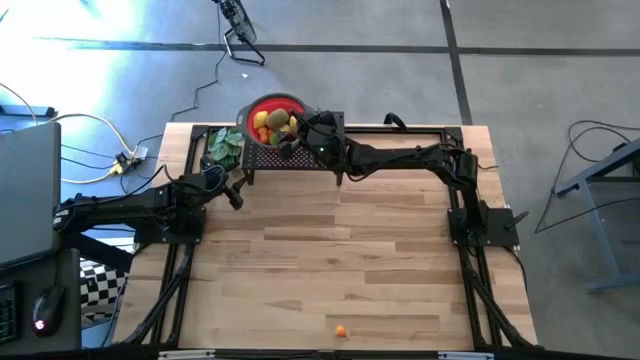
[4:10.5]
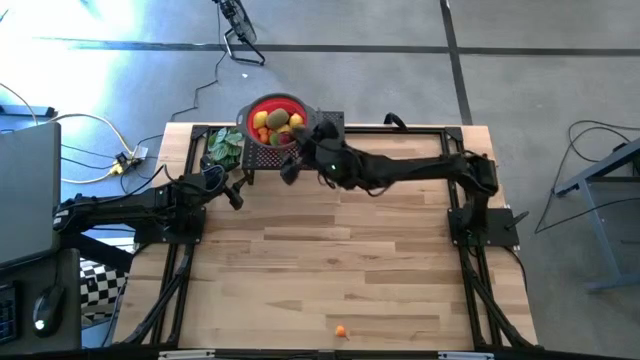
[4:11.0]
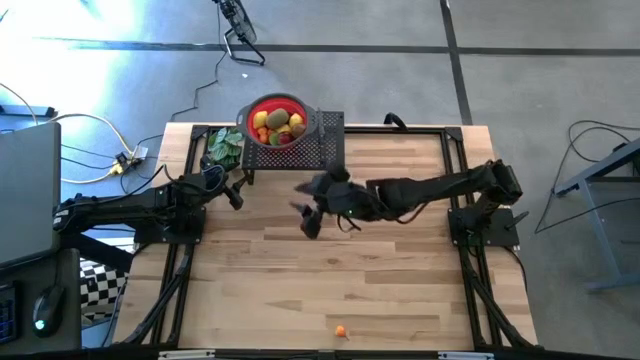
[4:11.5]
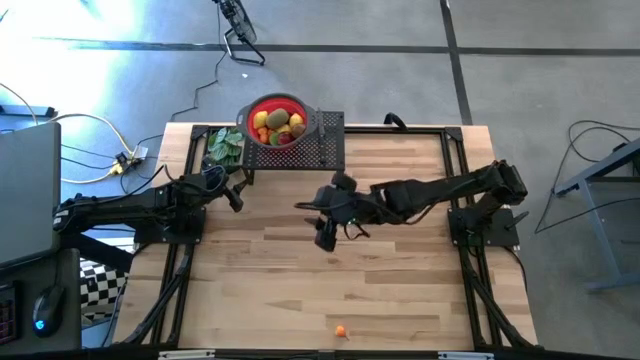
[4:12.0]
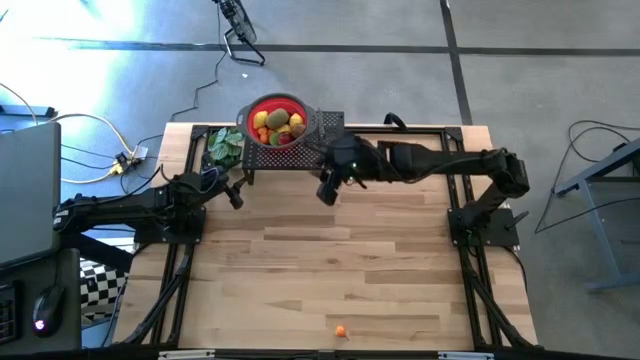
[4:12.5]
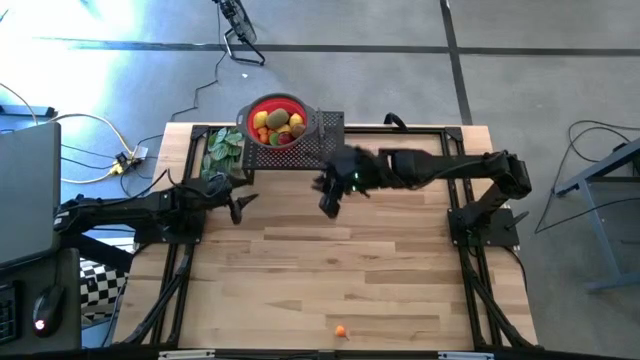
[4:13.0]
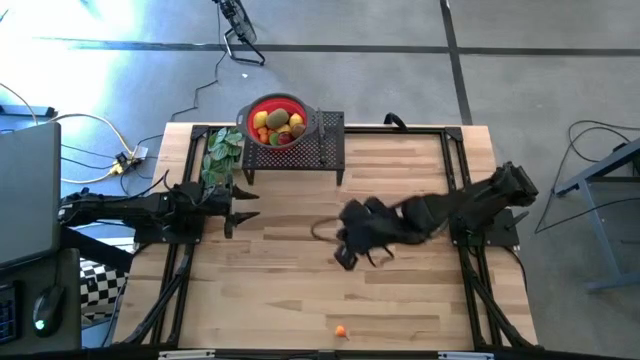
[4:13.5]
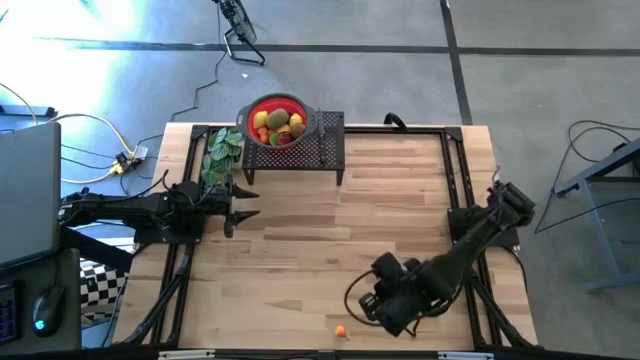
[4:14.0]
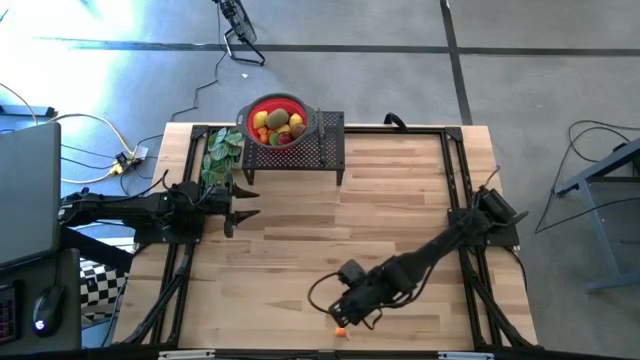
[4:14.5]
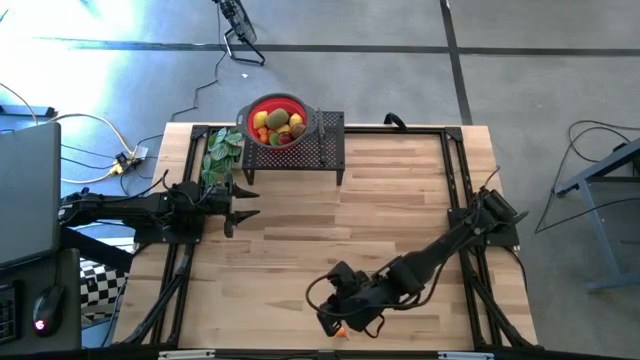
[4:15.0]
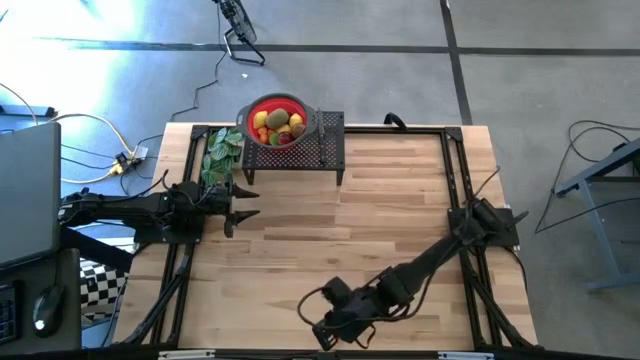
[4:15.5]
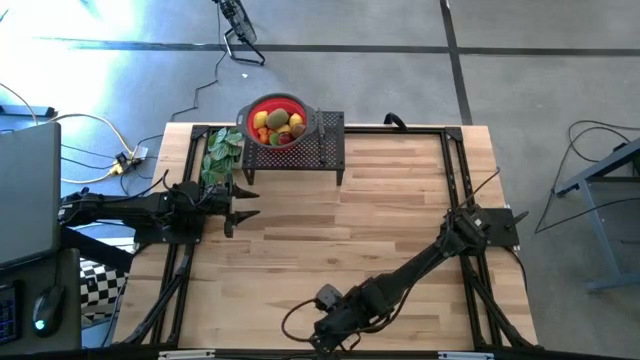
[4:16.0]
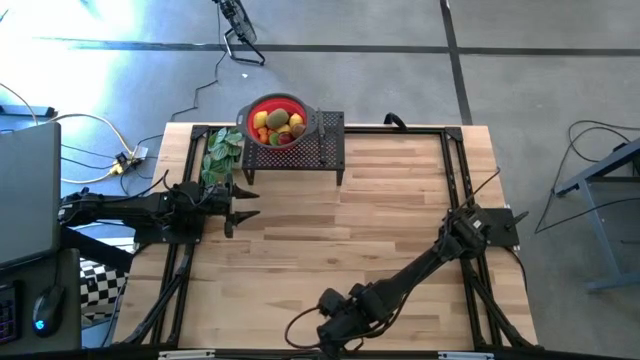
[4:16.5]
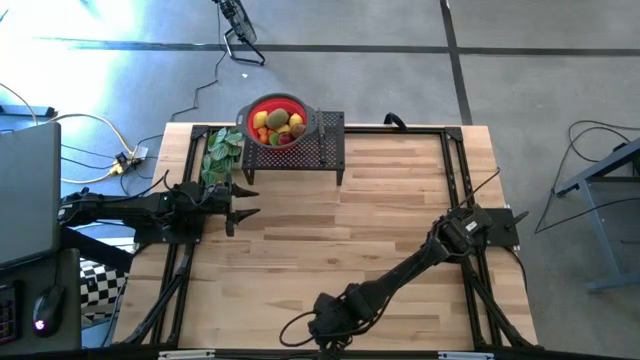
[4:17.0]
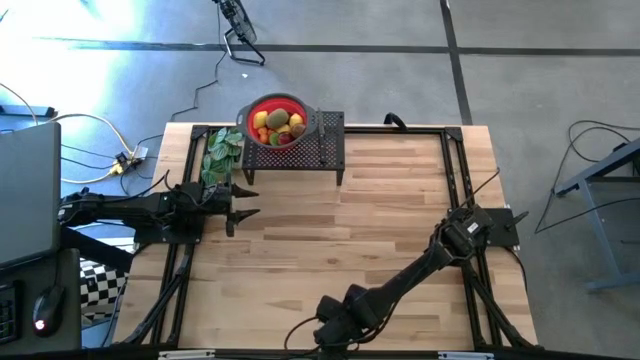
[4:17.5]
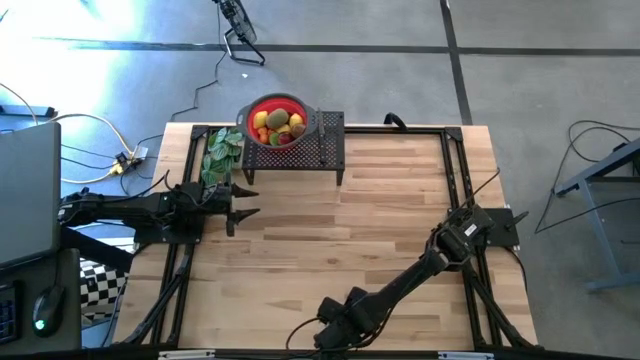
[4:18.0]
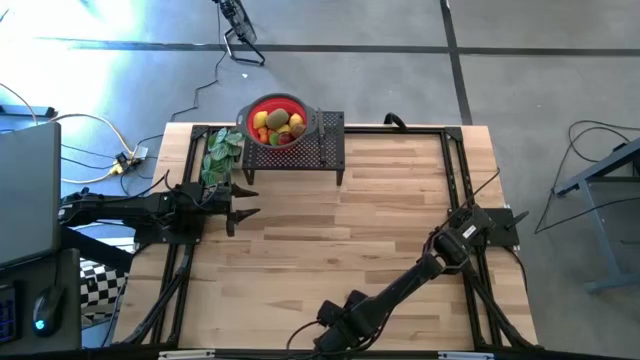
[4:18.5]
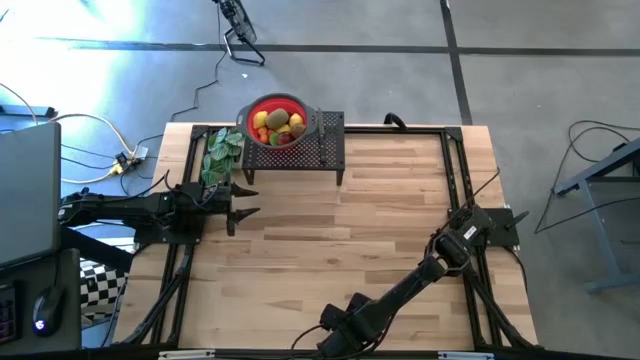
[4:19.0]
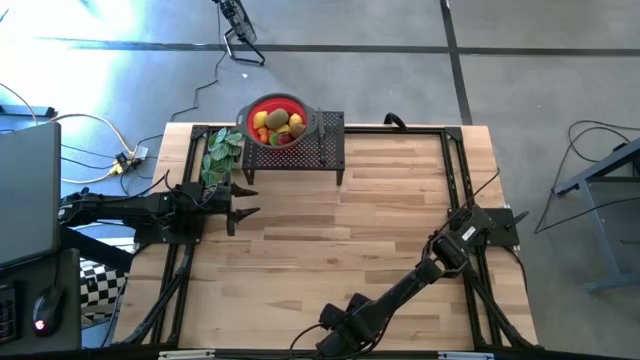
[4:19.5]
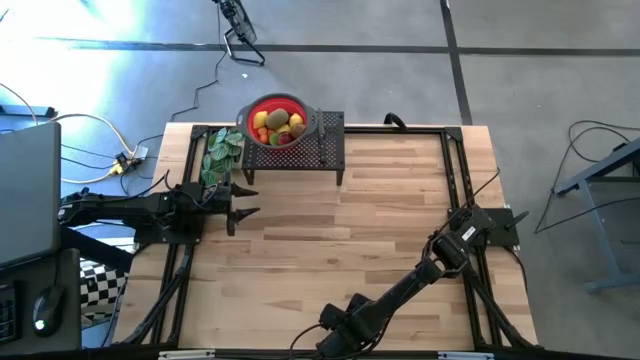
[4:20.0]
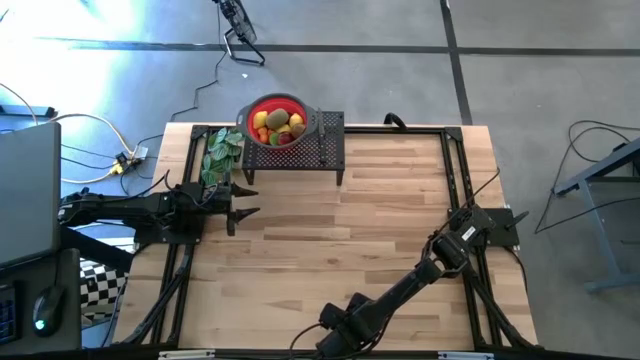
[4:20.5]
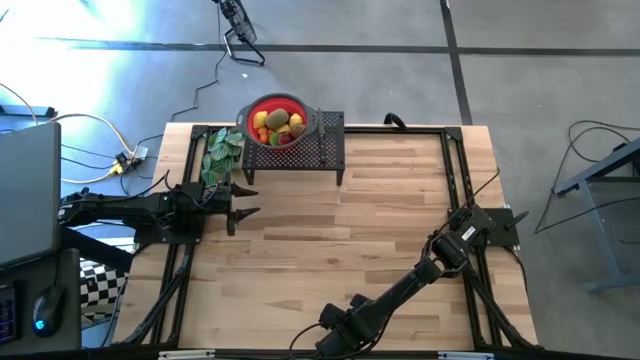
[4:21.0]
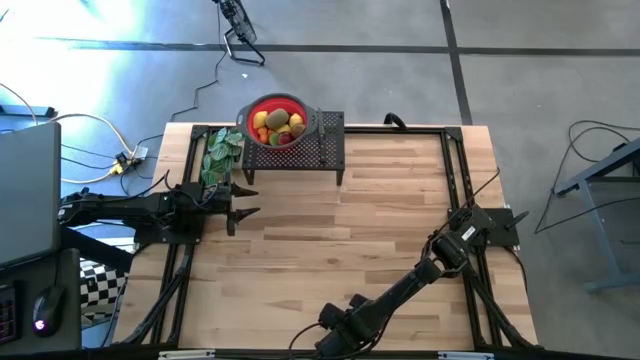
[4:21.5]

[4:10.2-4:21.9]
Task: Pick & Place Fruit
Put the orange pear into the red strainer bowl on the shelf

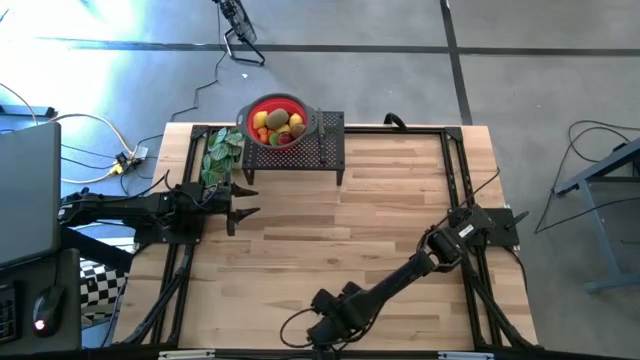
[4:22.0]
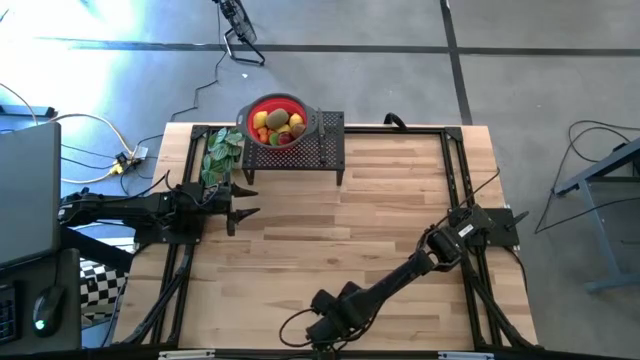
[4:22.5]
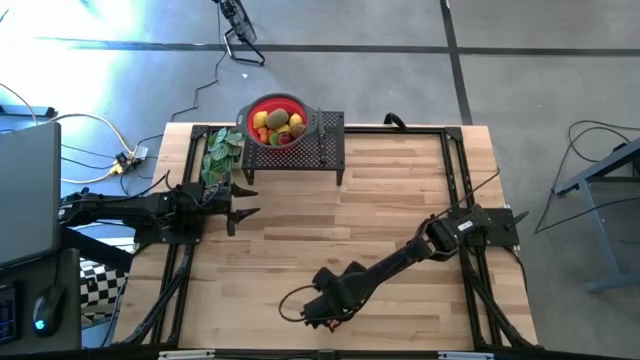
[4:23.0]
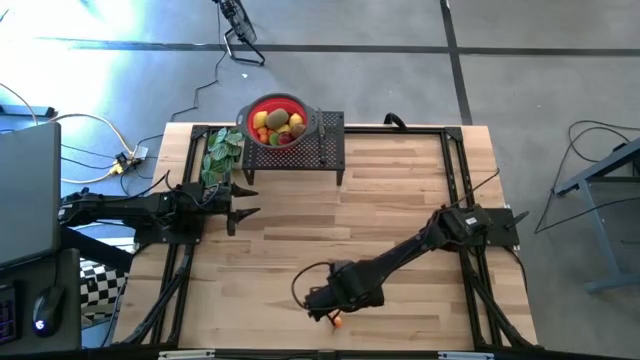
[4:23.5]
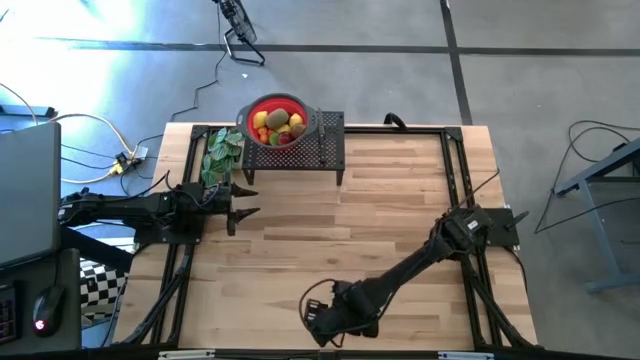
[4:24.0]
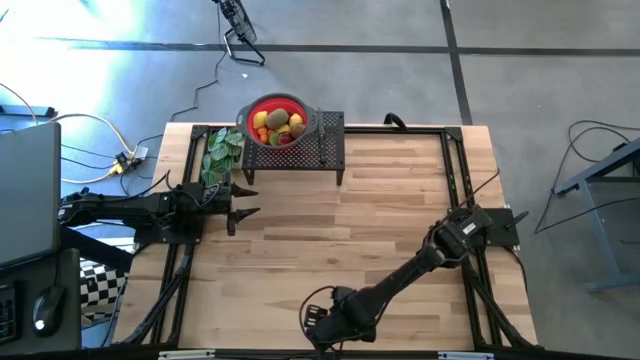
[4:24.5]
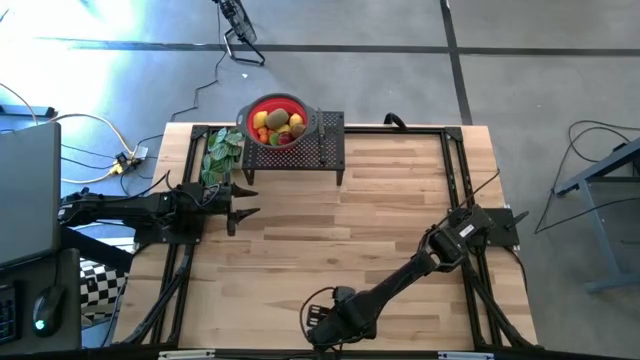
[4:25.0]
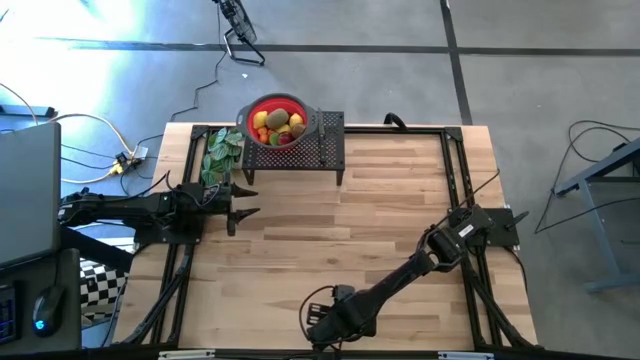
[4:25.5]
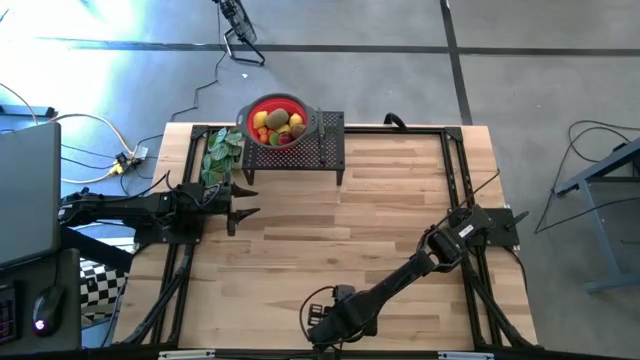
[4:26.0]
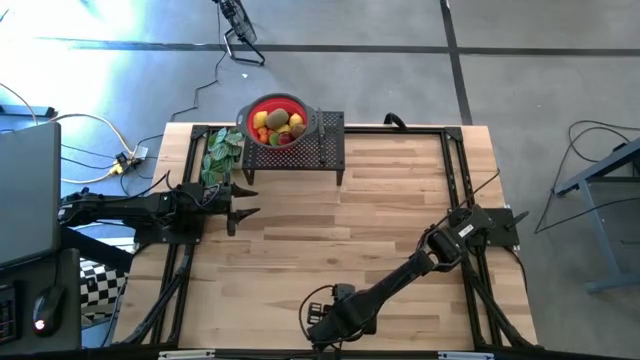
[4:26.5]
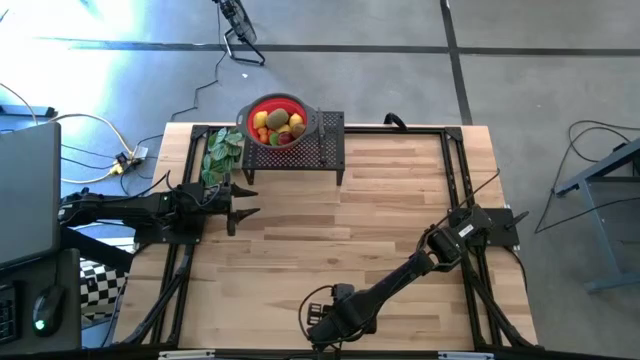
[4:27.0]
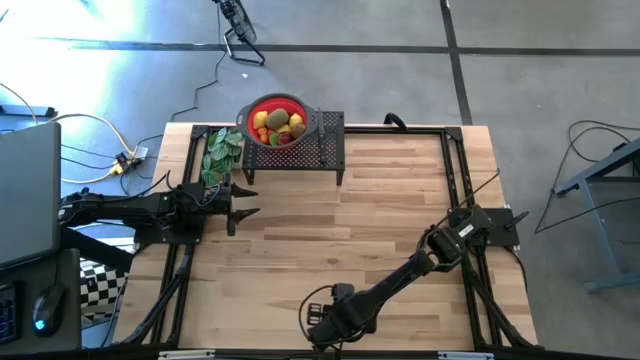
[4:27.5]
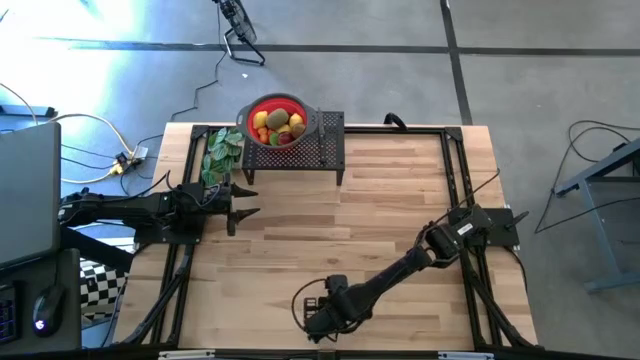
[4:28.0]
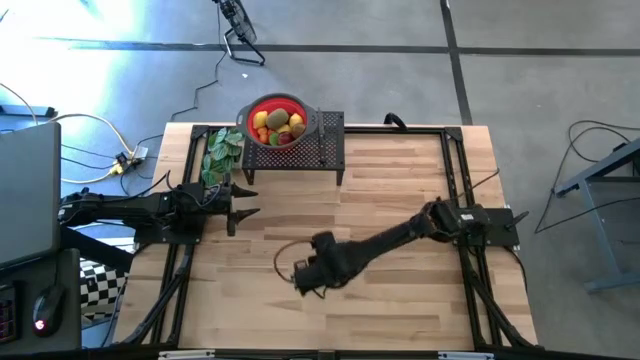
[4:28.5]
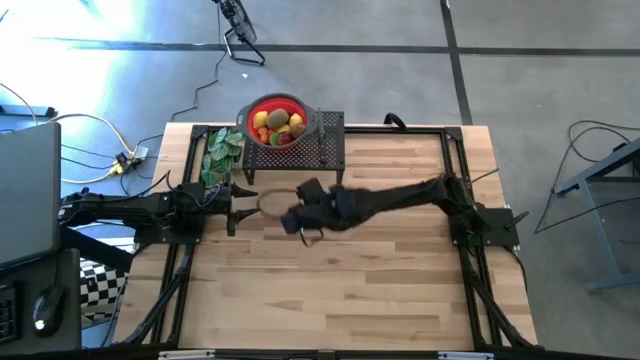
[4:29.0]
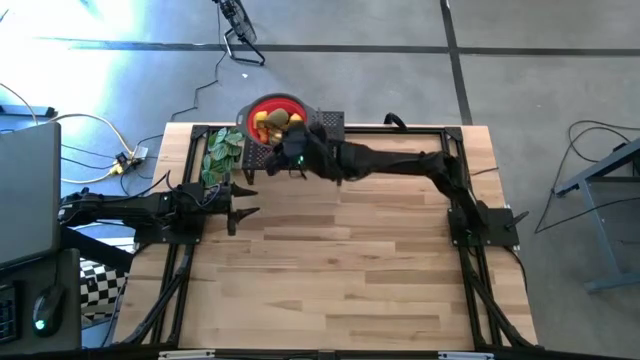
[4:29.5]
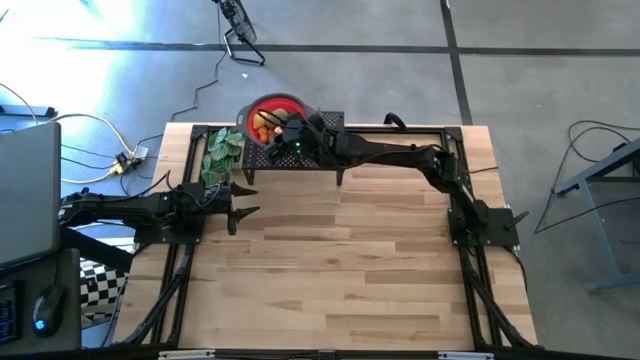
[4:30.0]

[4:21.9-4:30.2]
Put the orange pear into the red strainer bowl on the shelf

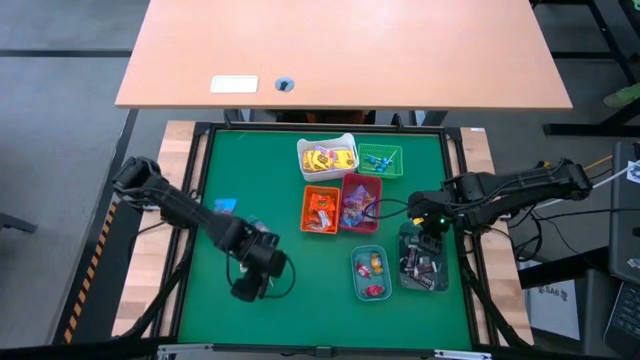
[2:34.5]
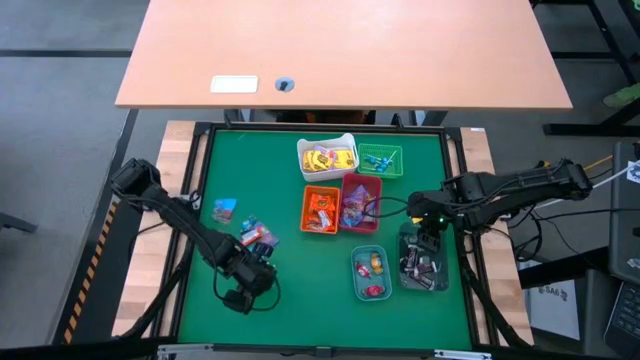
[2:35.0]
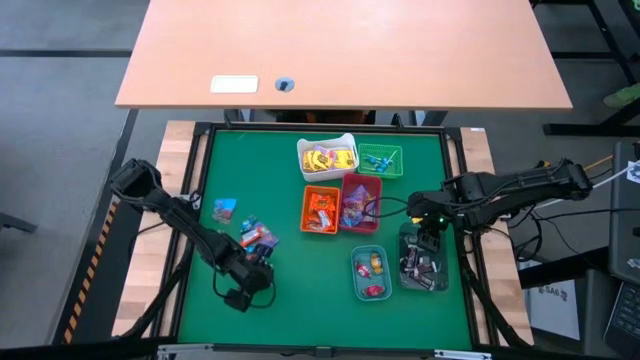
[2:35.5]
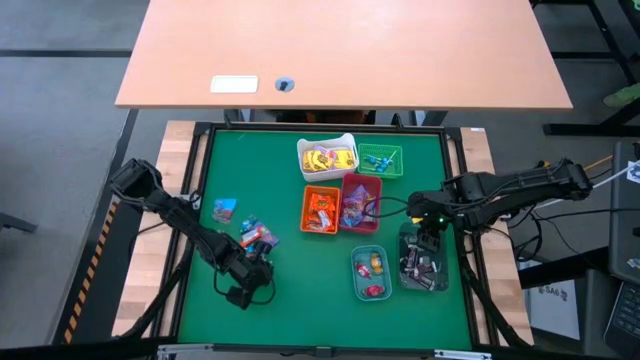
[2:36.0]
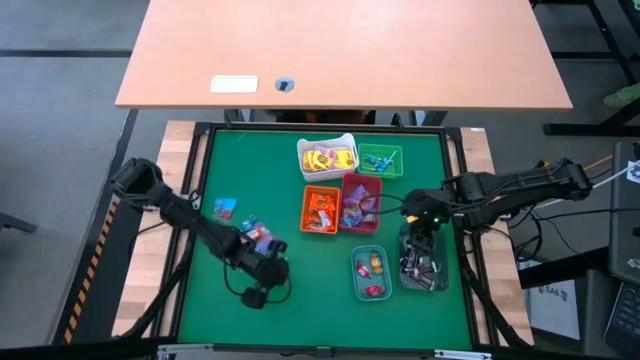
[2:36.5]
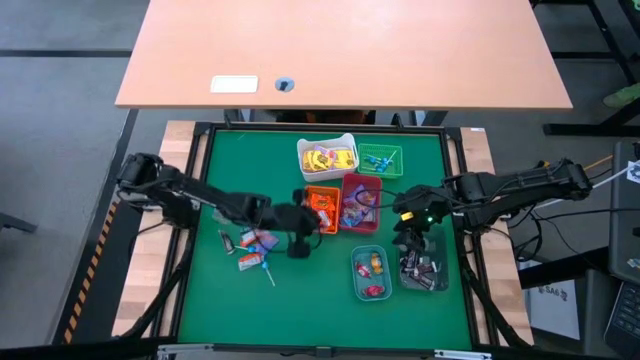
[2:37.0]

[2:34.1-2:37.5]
Task: Sort candy
Put the orange chocolate into the orange bin
